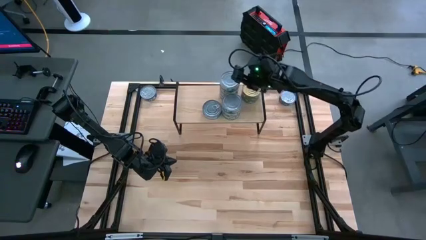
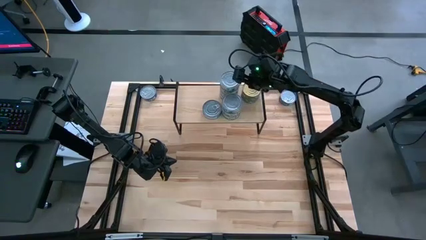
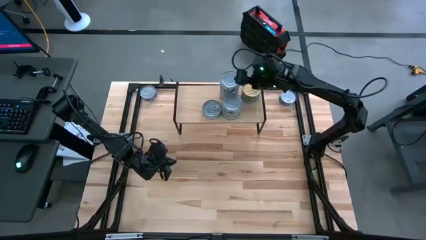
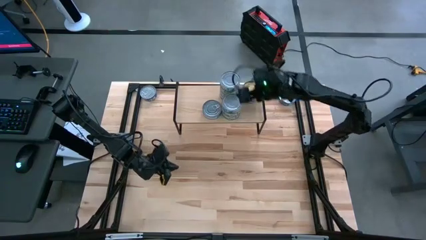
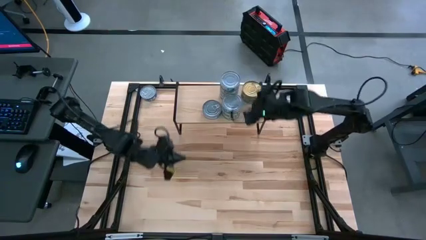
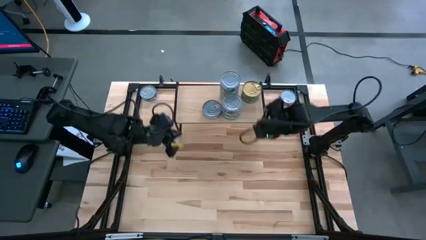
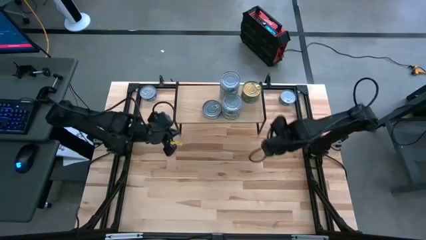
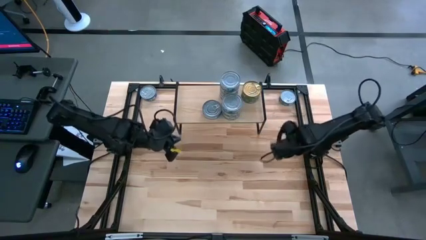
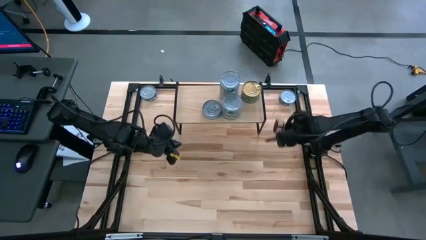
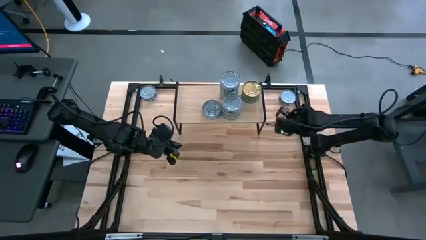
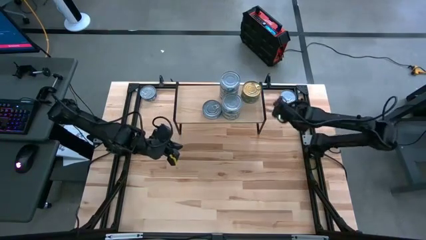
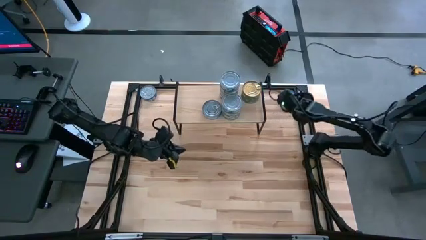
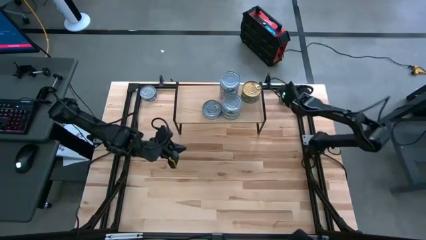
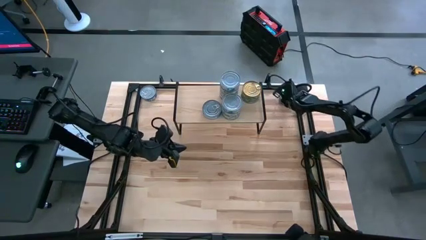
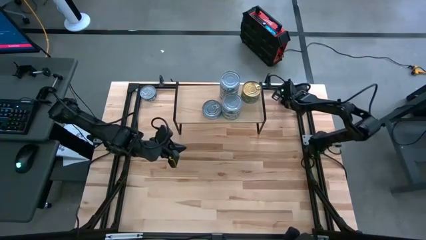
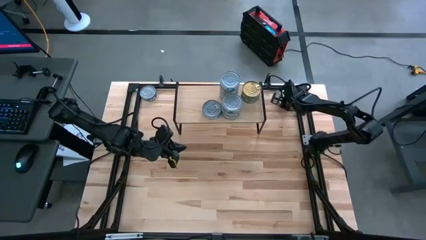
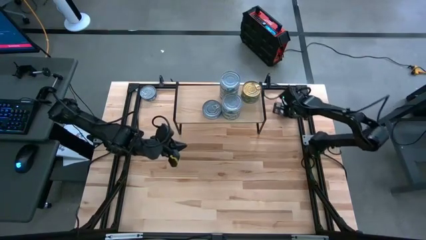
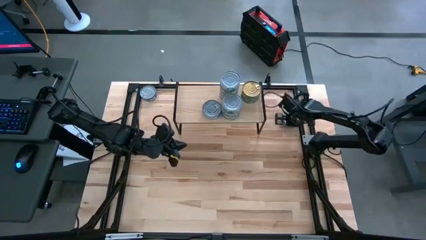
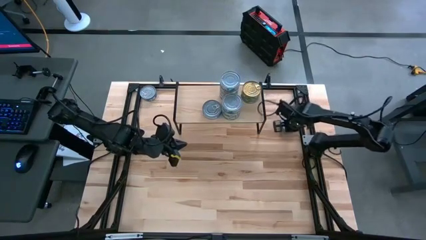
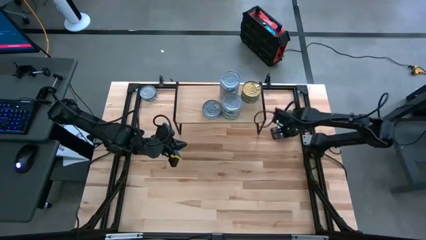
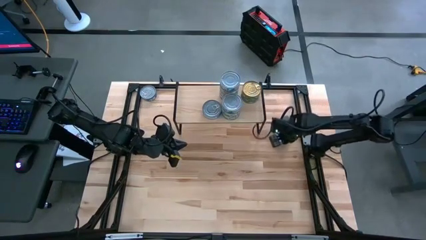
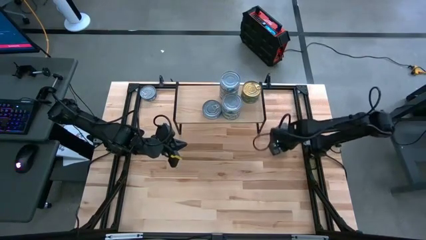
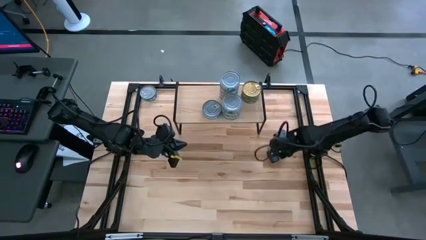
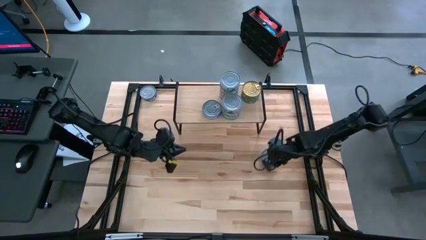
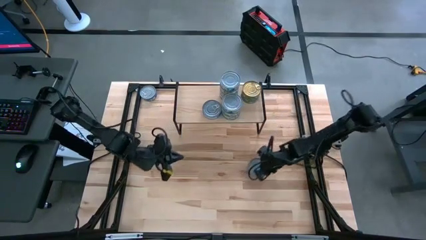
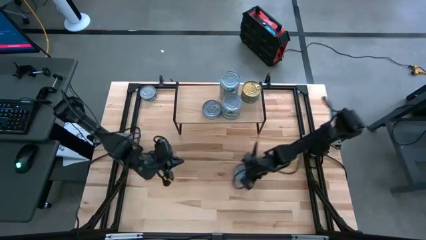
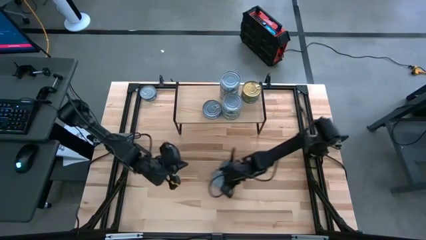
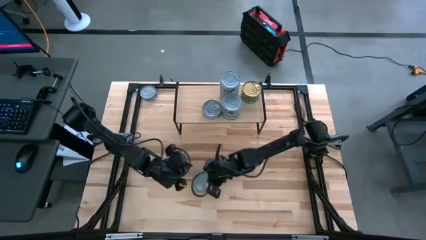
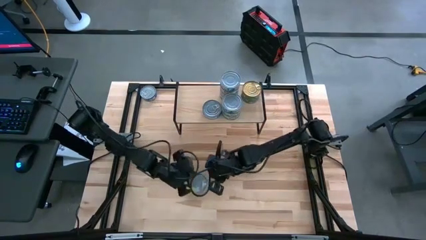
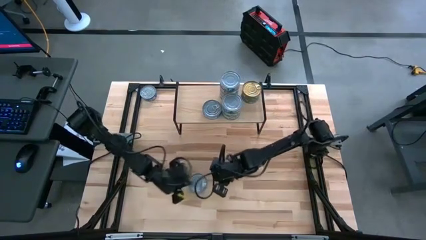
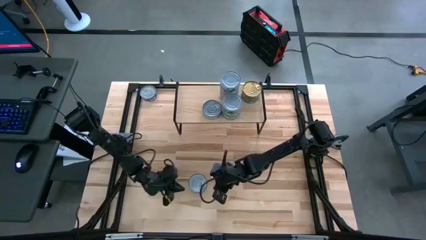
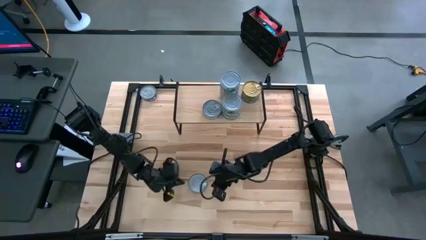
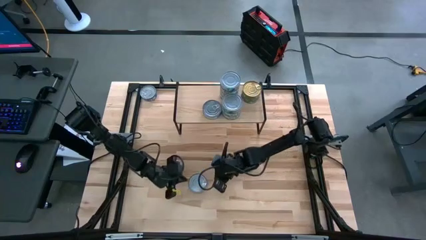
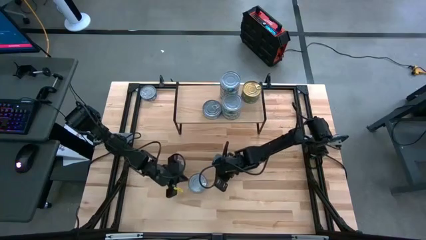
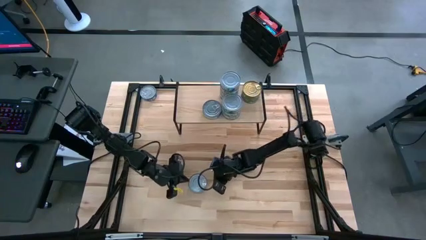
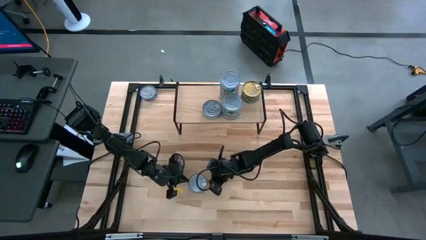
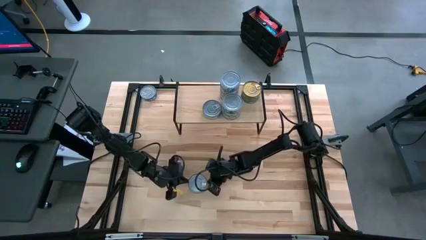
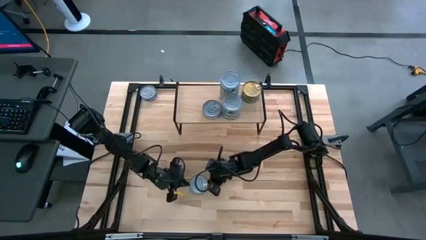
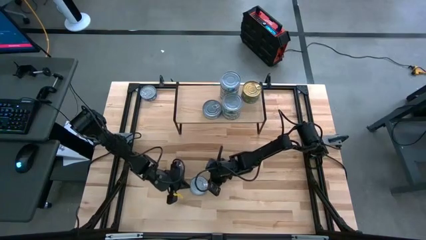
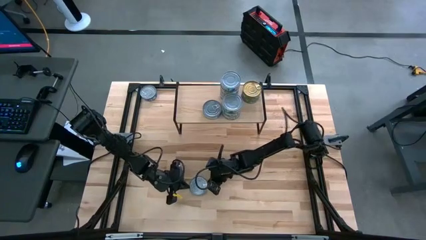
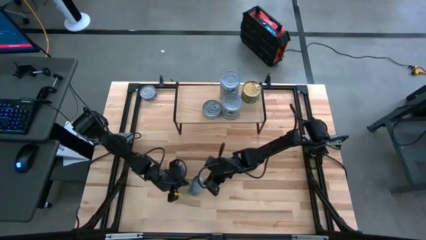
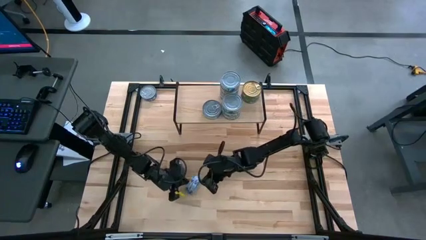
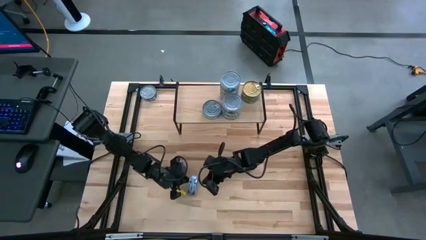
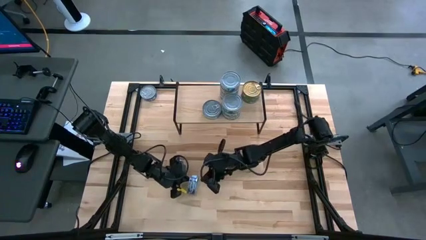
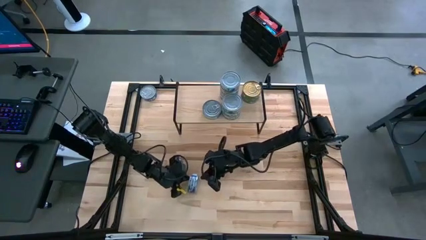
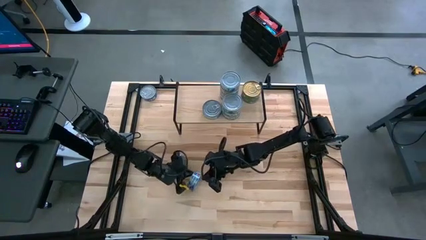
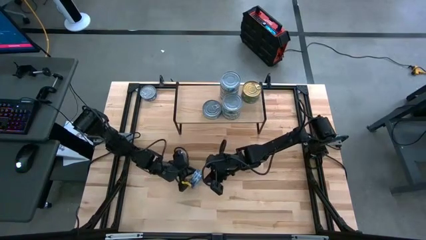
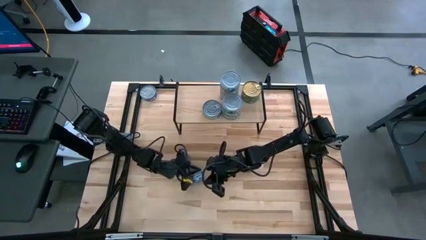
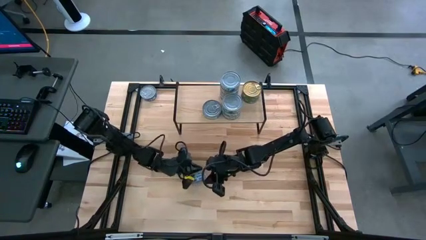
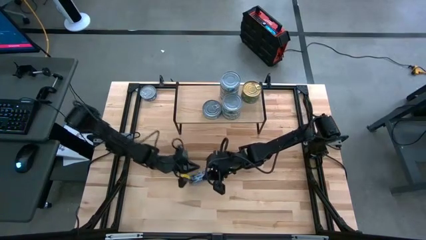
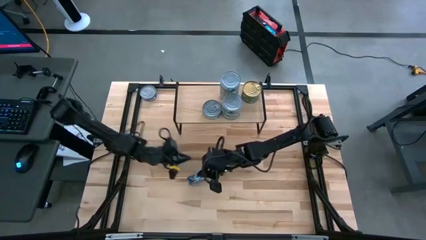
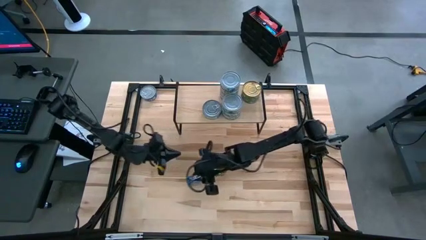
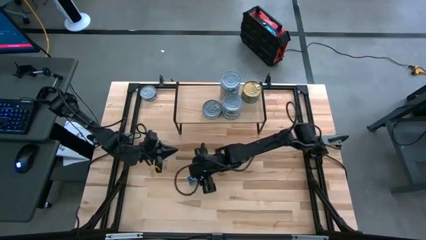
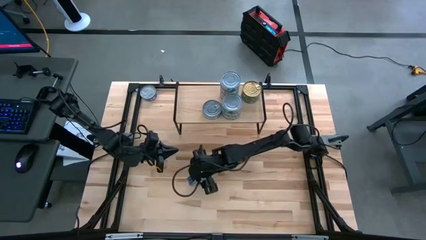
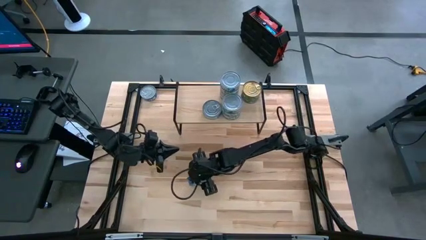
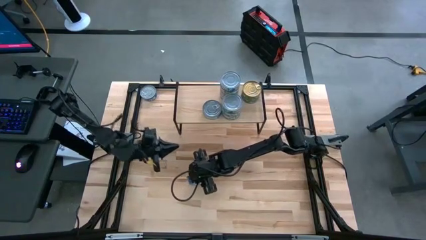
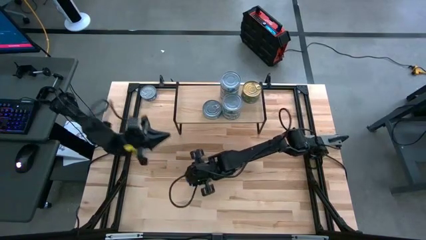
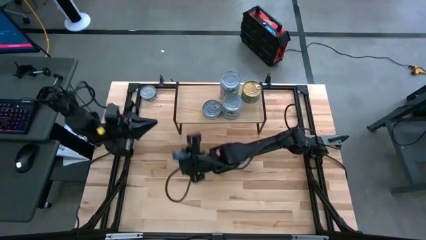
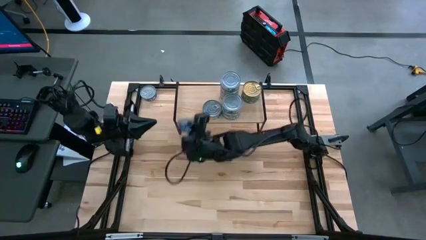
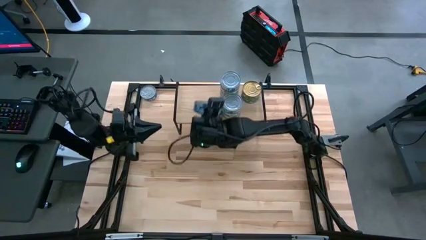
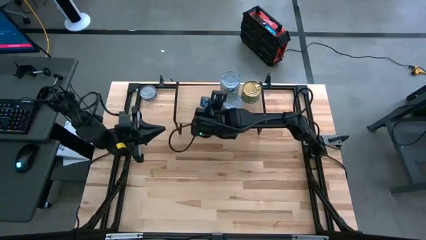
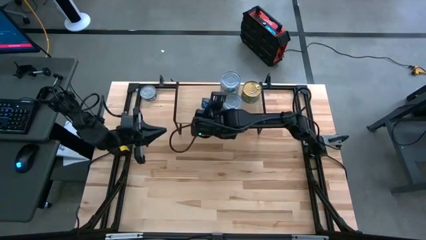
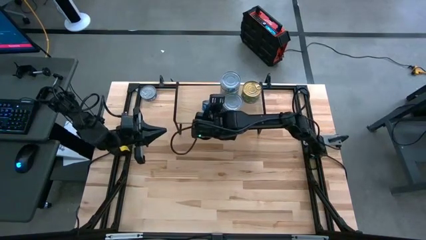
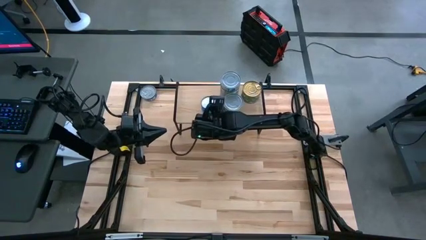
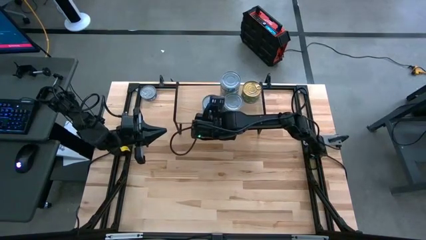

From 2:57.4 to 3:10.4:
Task: Stack canned seafood by type on shelf
Stack the blue tuna can on top of the other blue tuna can on the shelf

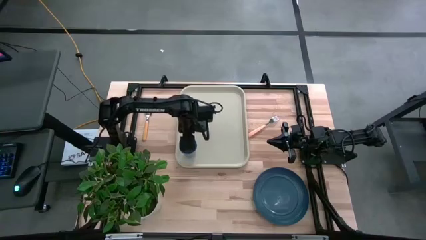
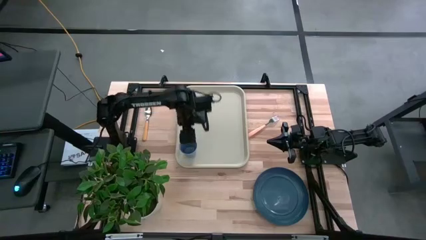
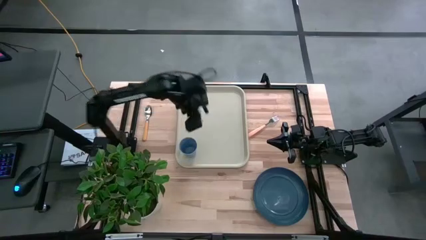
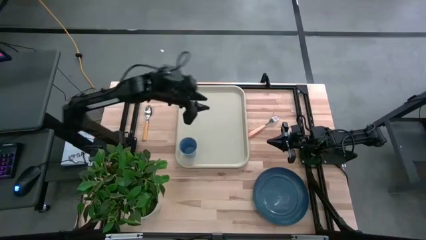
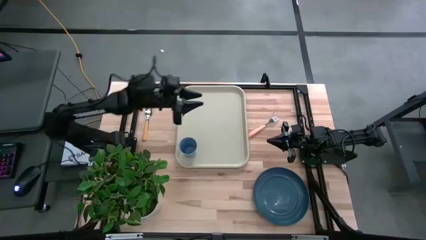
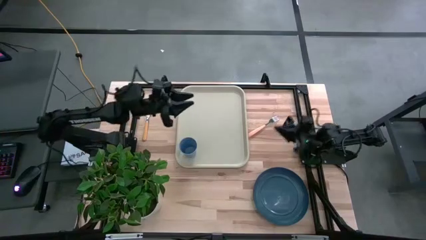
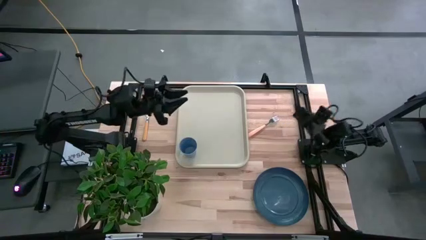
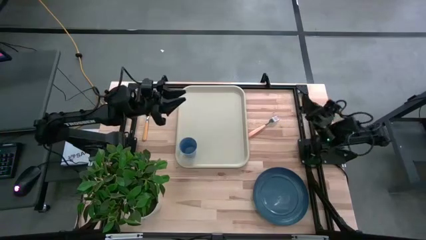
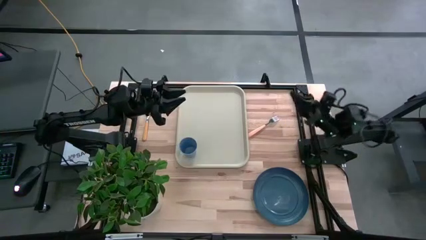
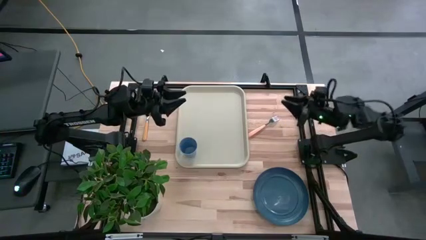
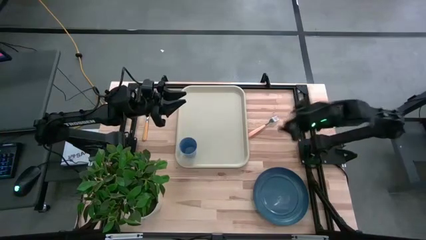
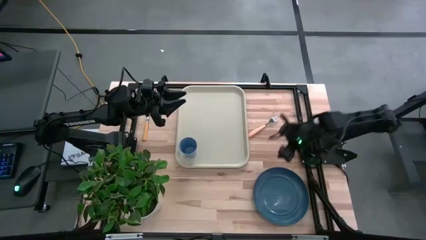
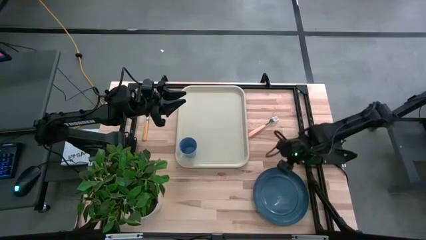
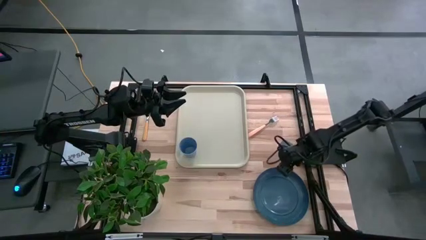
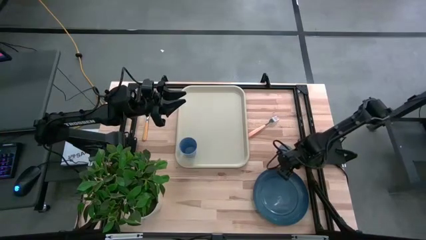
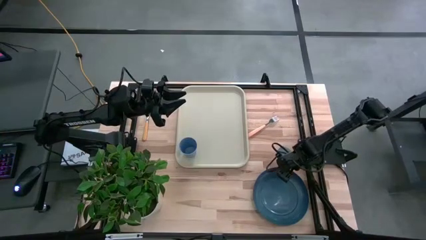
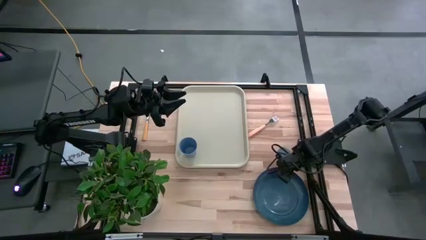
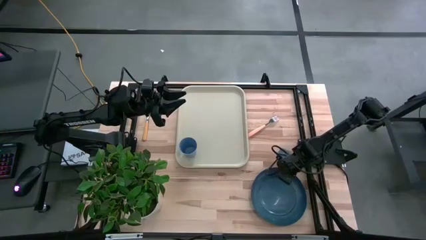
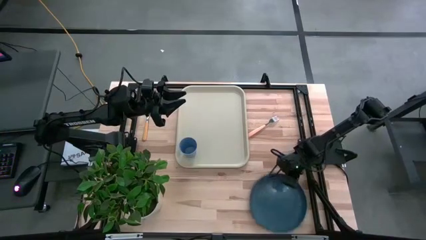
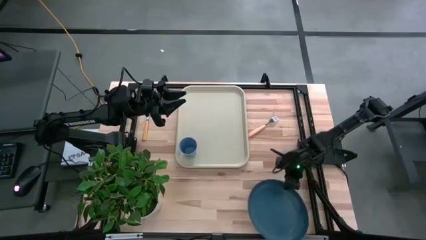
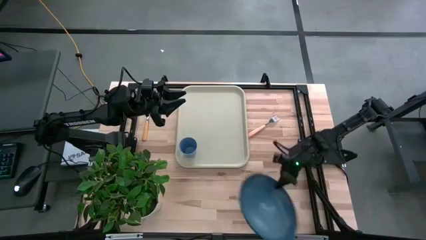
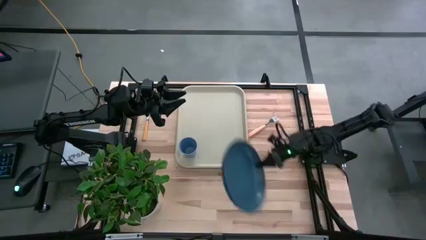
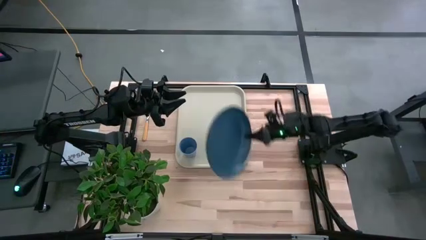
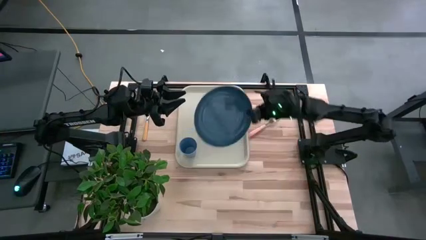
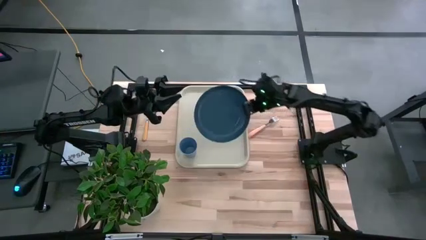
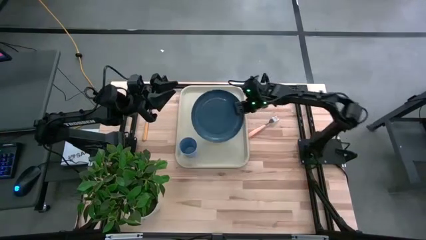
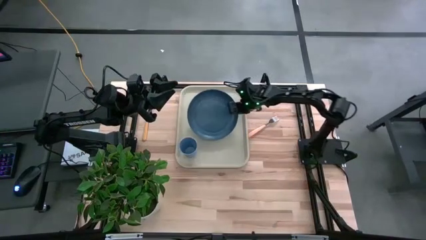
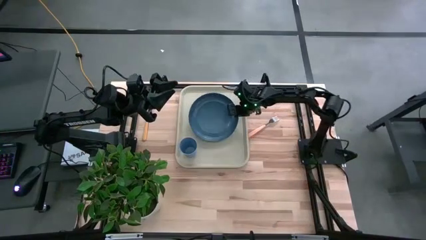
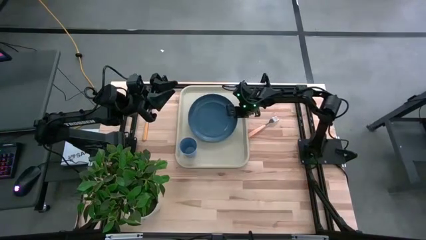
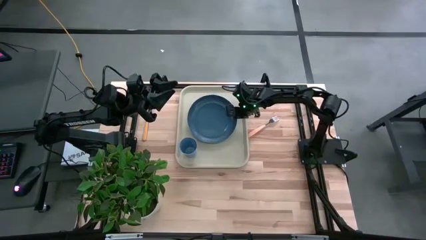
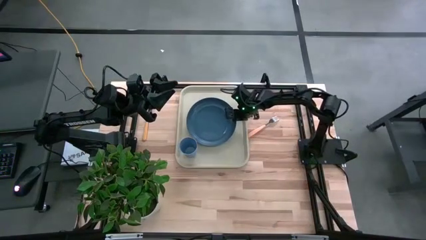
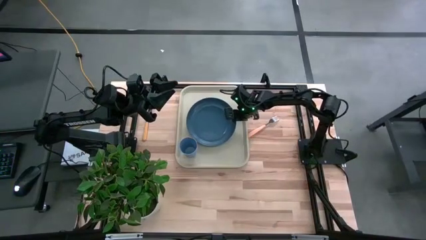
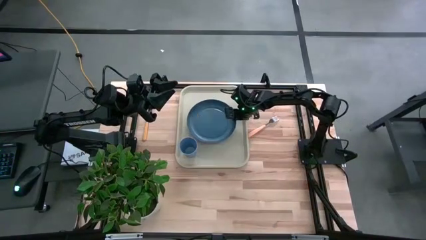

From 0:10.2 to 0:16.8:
Task: Pick and place plate/cup/fork/spoon on tray
Put the blue plate on the white tray to the top of the blue cup
